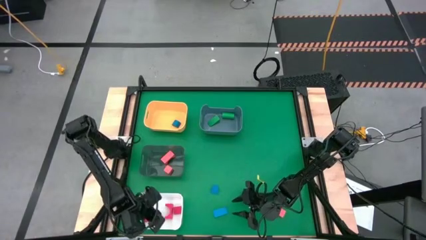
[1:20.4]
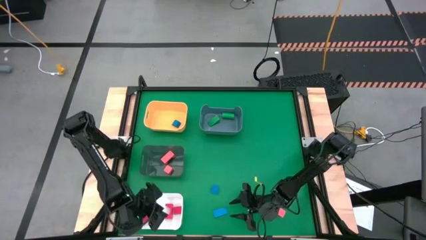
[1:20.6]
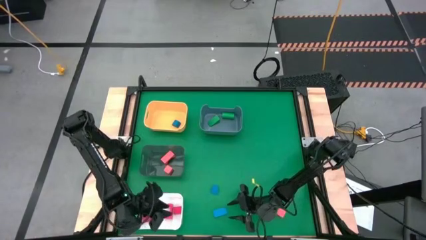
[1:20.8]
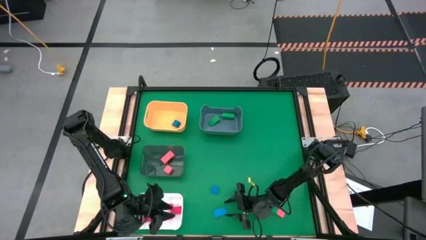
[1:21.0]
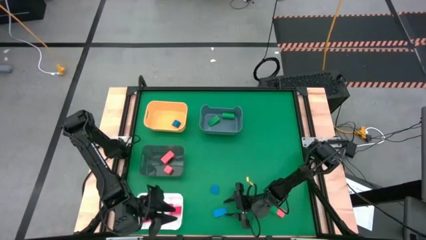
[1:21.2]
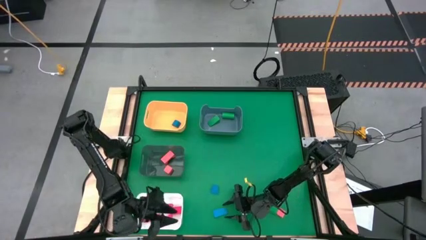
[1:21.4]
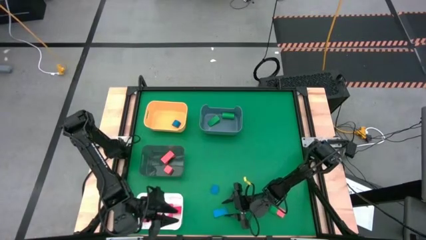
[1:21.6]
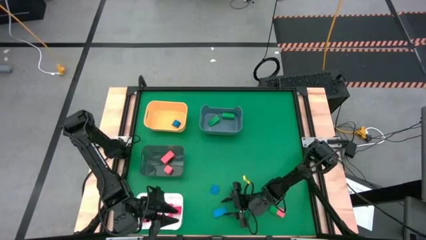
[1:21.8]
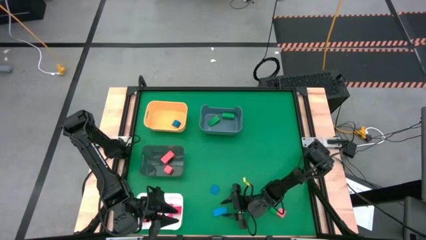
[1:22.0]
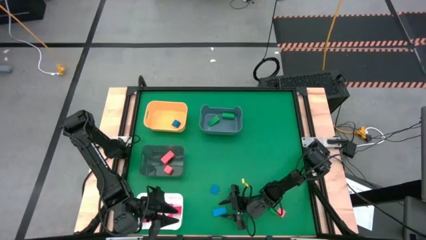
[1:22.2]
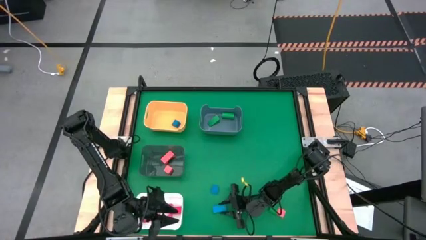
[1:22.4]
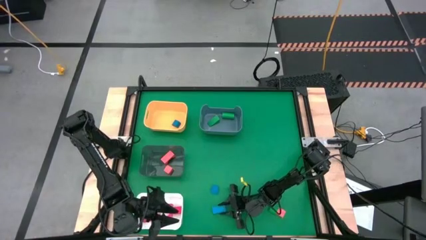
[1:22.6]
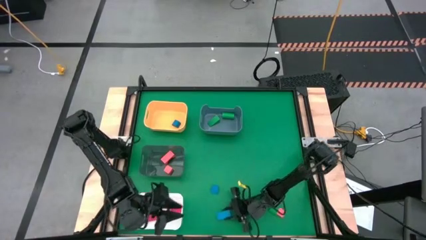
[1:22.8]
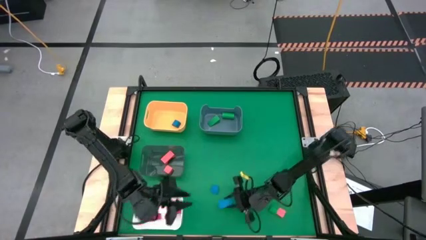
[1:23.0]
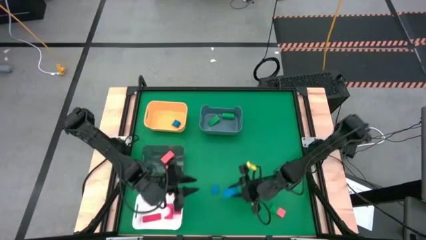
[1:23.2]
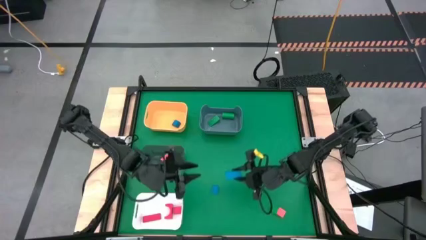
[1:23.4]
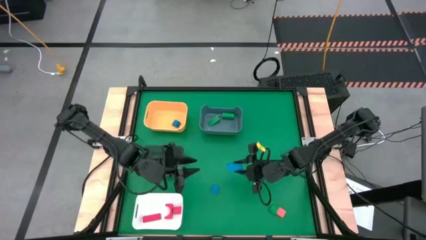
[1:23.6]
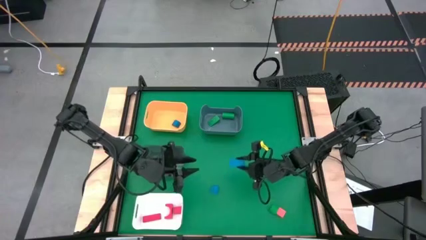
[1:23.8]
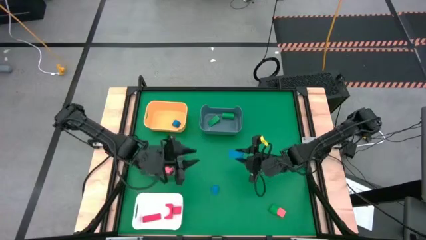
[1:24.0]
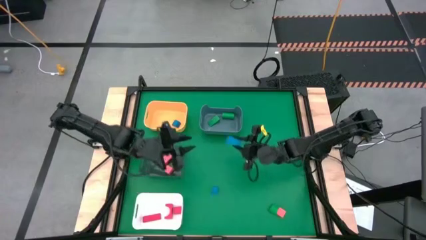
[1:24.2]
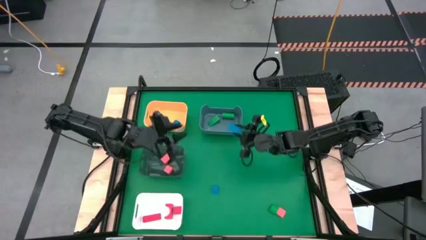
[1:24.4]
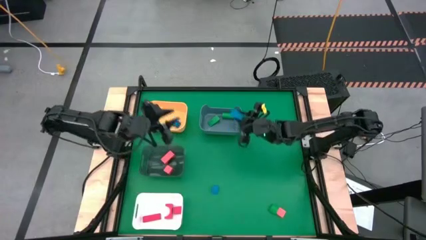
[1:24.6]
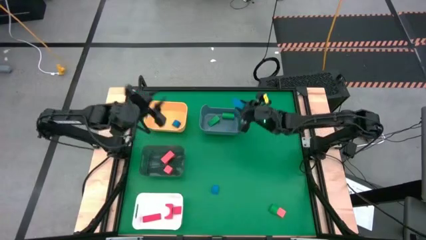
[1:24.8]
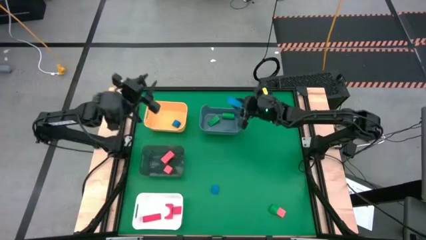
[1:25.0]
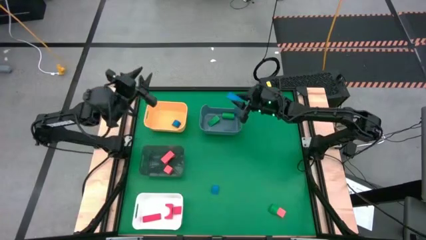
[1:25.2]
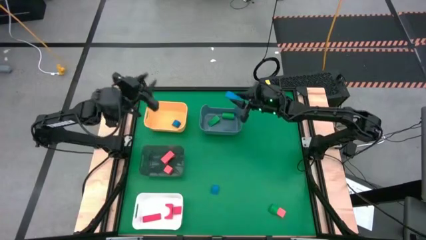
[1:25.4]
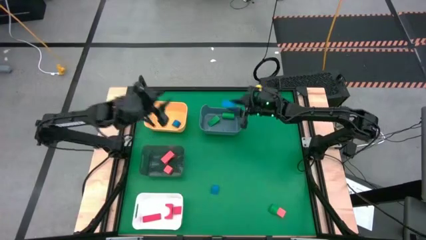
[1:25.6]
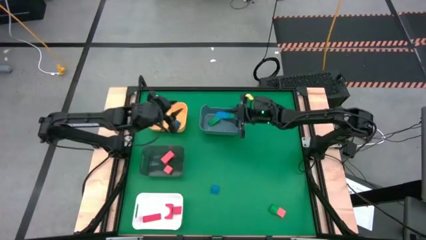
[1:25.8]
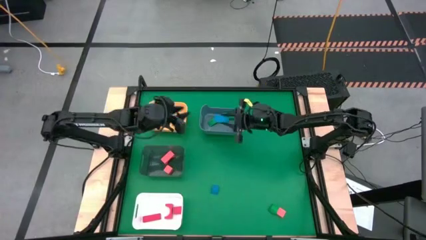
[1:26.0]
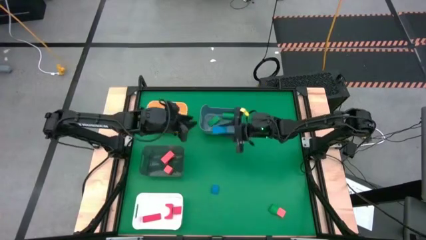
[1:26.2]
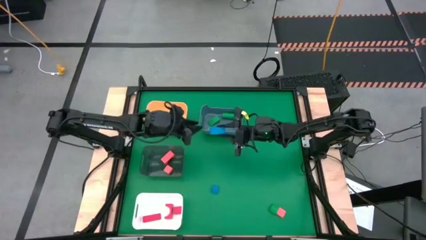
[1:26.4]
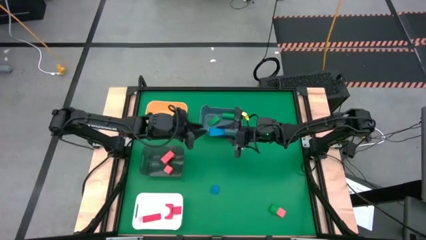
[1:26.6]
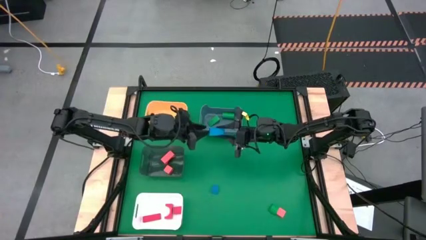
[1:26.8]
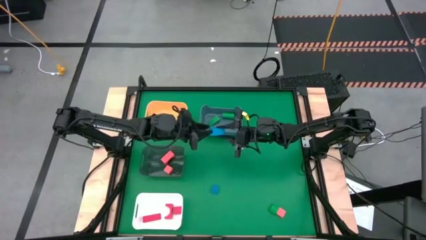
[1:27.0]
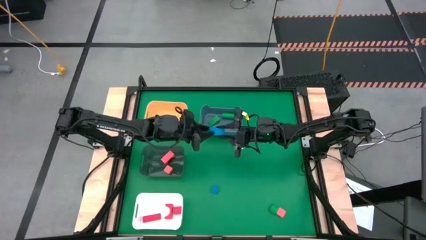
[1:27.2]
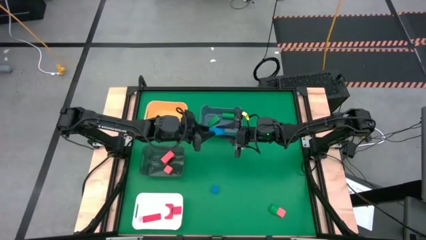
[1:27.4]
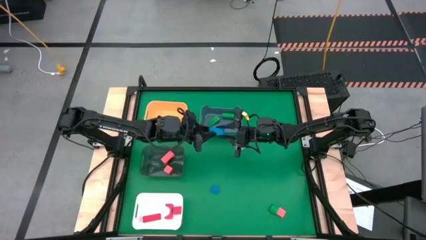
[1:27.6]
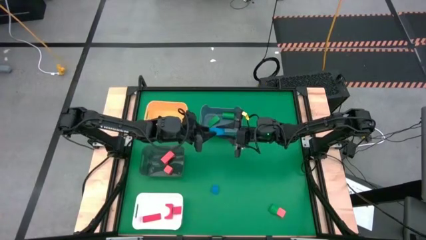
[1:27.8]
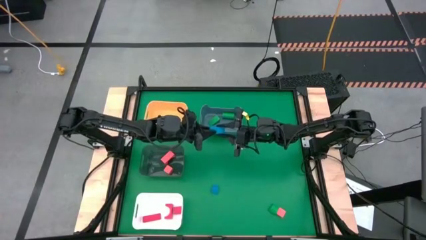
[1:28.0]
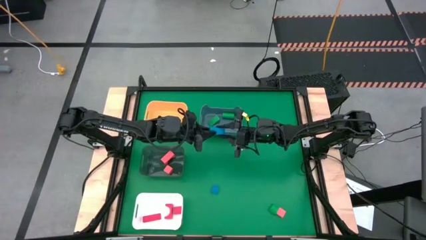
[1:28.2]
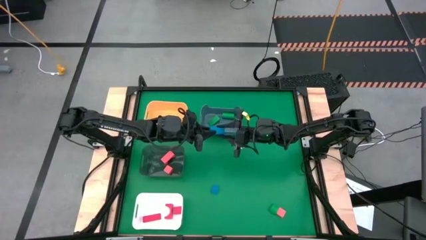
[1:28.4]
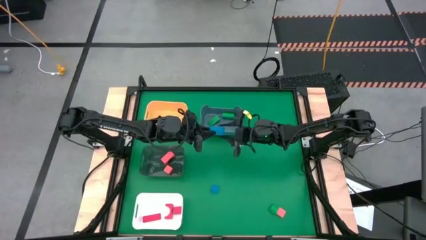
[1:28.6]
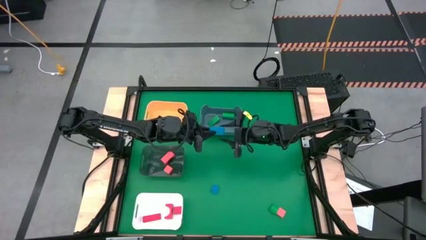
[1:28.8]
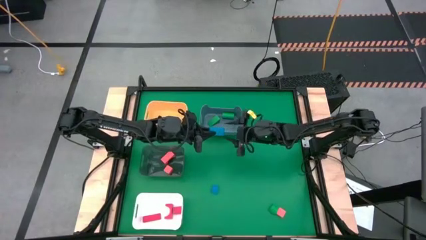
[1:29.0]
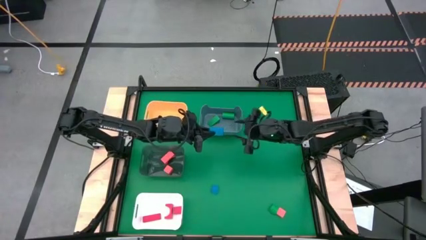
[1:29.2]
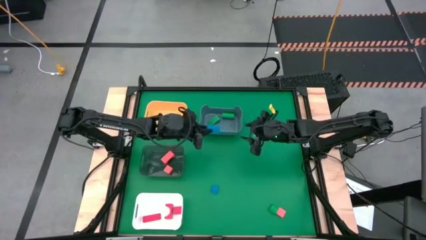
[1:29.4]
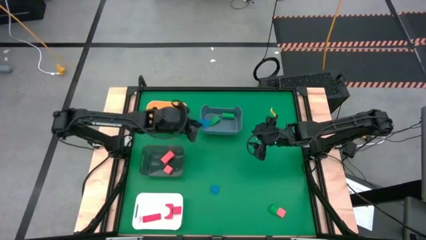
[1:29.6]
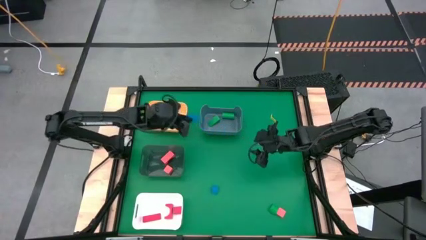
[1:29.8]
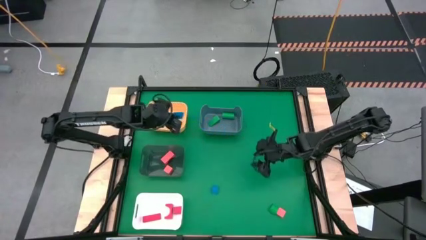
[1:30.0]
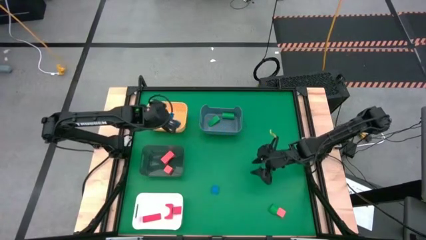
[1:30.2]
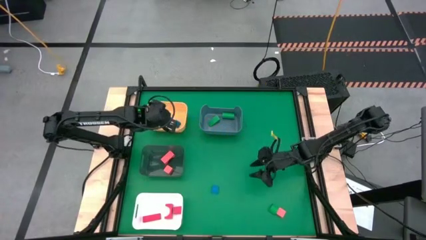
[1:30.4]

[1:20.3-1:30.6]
Task: Sort & place blocks by color
Put the blue rectangular block into the yellow bin

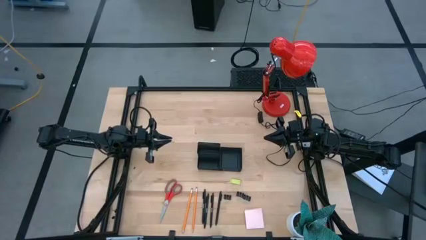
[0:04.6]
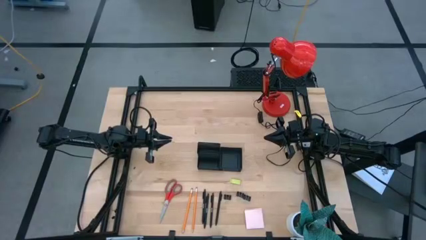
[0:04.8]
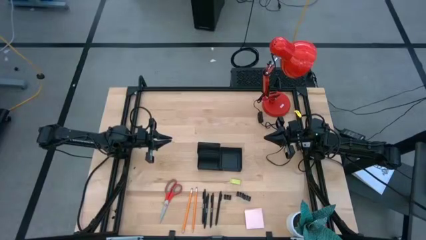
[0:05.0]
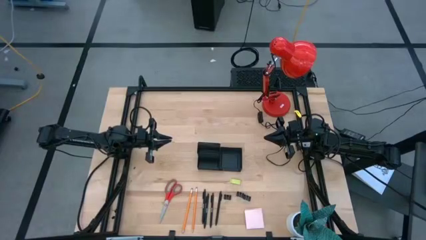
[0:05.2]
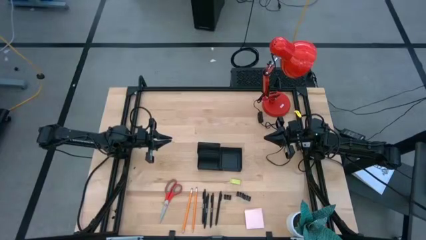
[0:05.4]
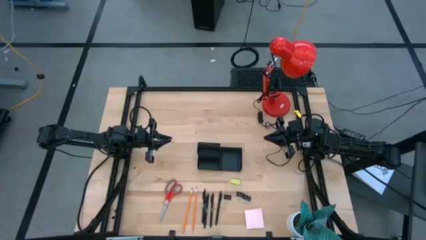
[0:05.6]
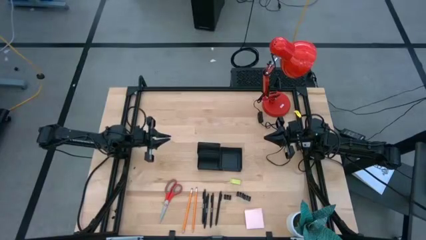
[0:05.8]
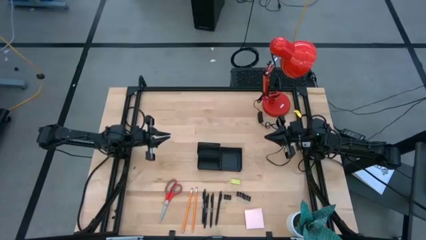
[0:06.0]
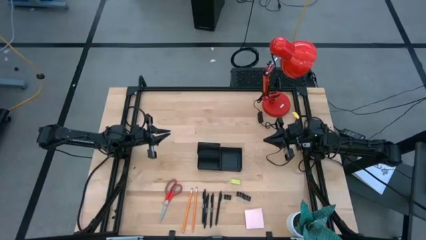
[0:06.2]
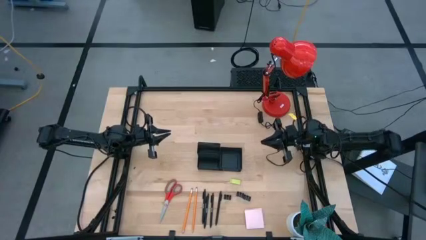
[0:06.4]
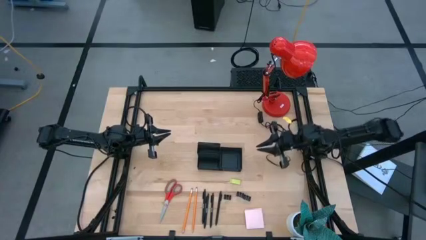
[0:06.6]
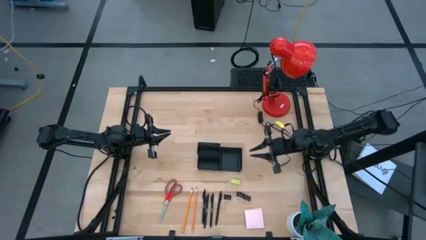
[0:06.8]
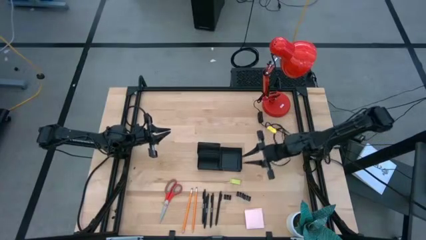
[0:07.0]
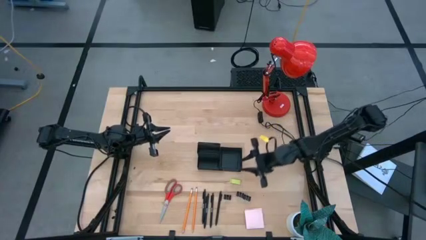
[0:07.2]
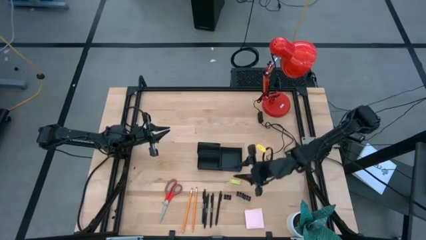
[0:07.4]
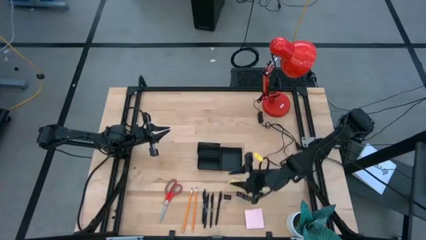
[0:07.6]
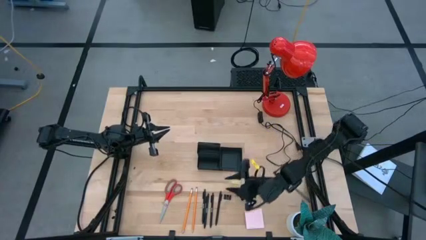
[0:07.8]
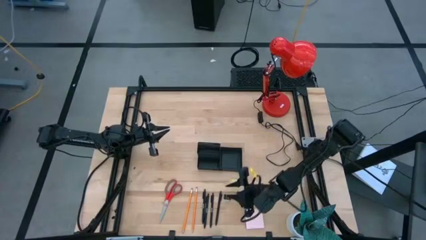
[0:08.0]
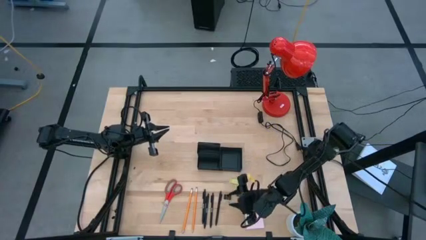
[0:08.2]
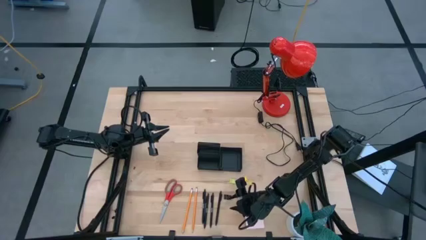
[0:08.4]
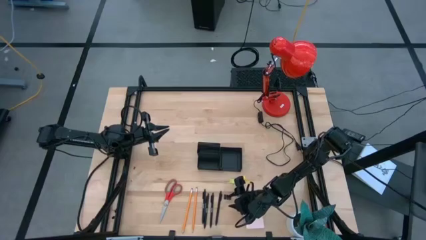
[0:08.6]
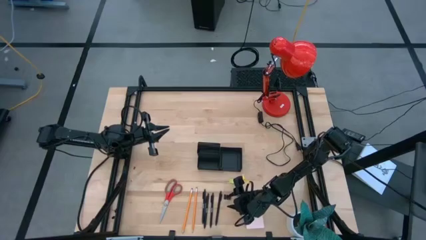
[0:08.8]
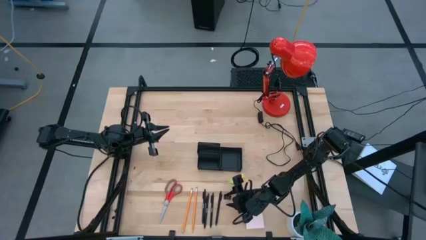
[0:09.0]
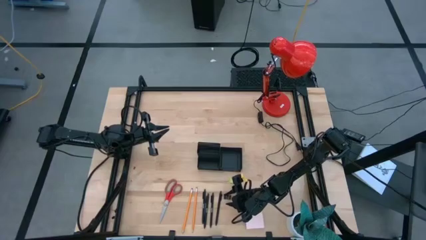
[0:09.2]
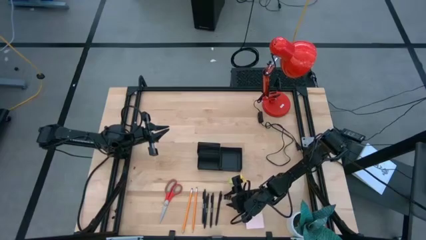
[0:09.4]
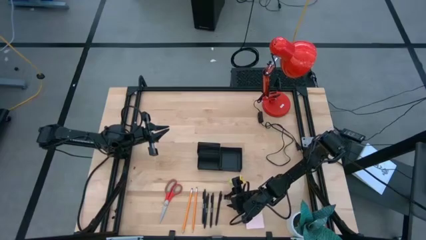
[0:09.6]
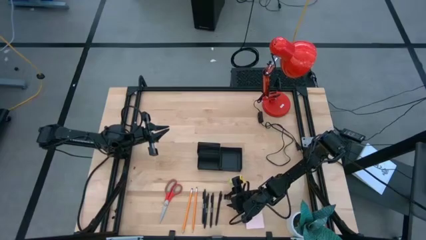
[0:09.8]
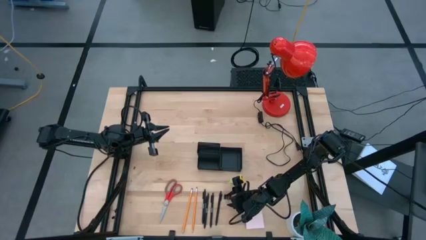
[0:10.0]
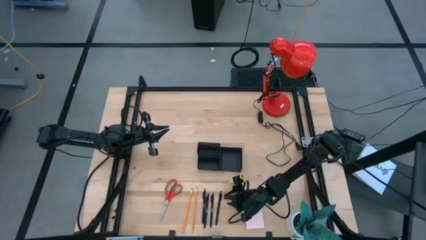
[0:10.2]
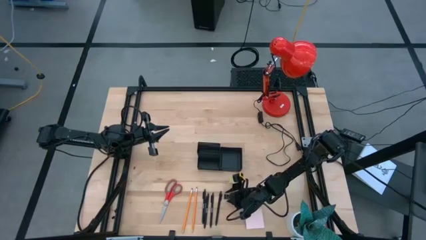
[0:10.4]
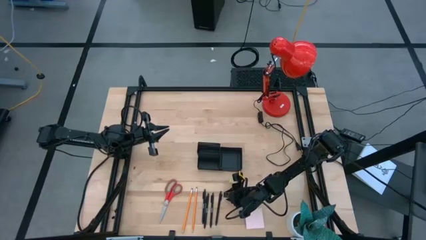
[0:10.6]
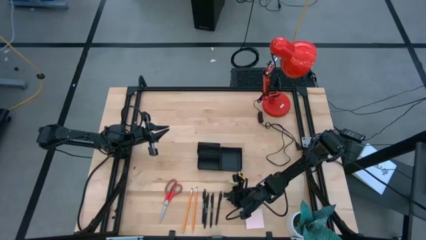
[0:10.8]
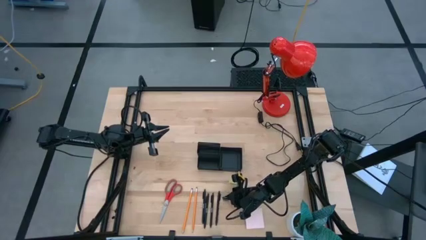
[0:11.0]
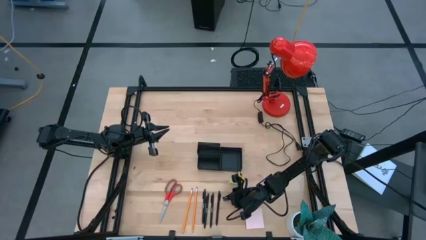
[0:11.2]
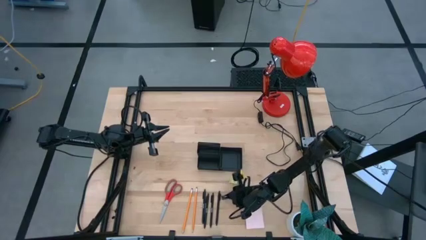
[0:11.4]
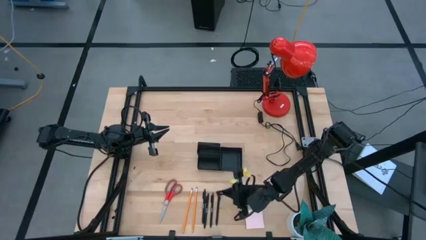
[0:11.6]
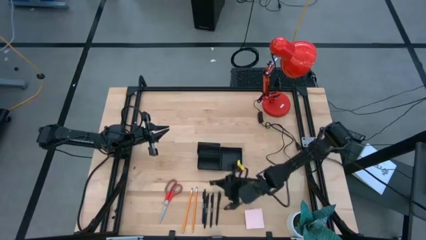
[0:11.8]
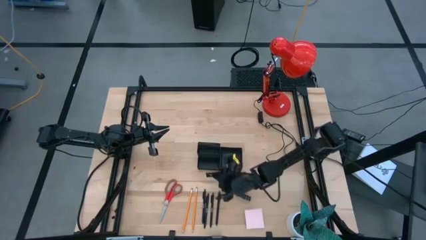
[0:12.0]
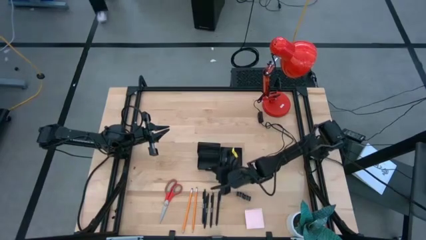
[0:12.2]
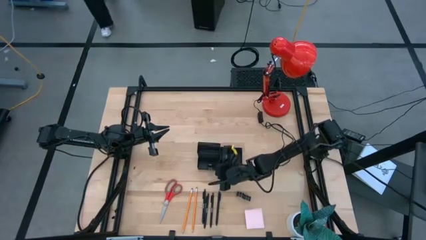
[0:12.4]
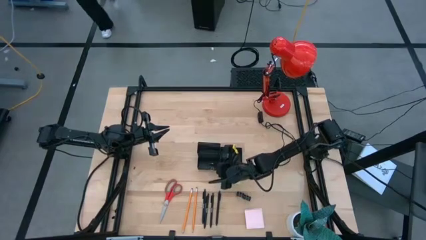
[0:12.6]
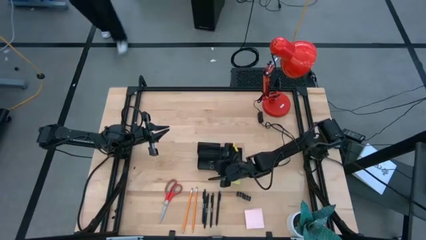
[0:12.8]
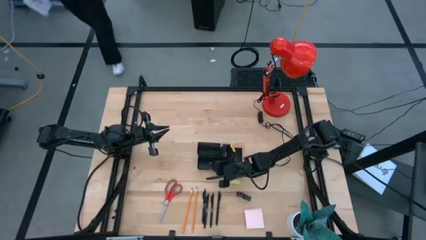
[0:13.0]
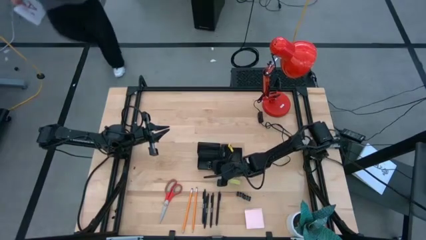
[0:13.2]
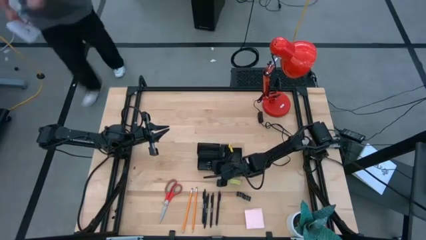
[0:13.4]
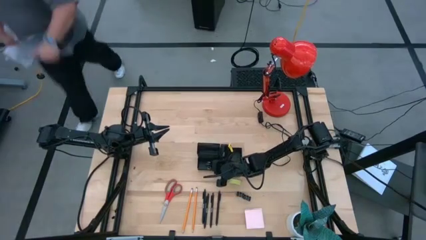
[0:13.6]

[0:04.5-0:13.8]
Task: Pick and place office supplies into organizer
Put the black binder clip into the black desk organizer
